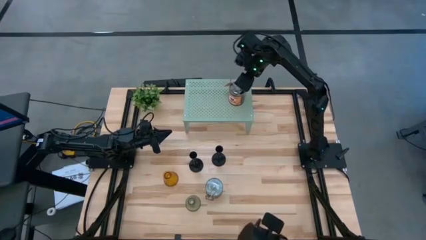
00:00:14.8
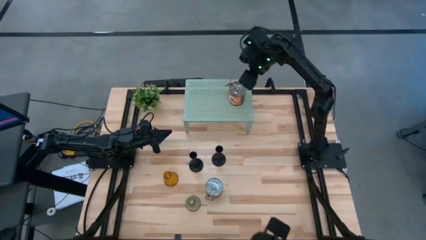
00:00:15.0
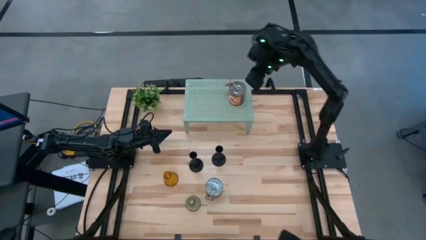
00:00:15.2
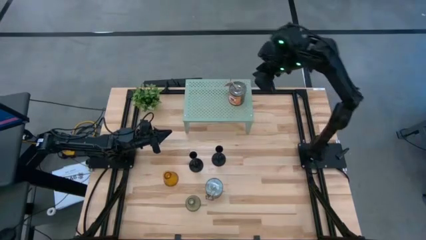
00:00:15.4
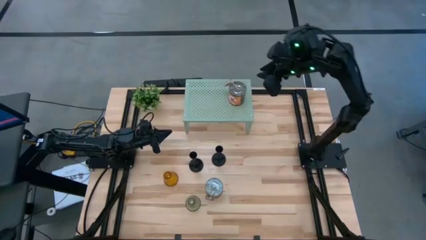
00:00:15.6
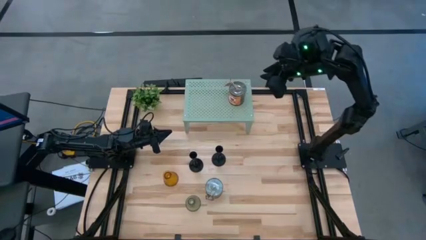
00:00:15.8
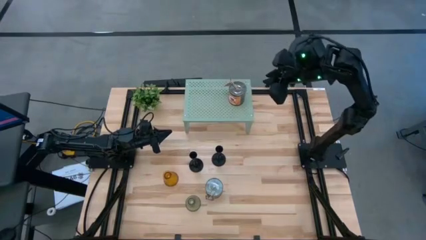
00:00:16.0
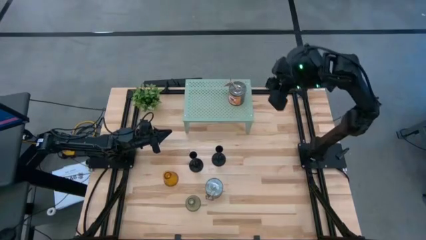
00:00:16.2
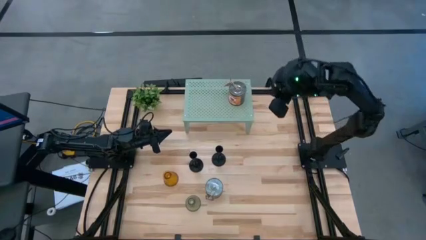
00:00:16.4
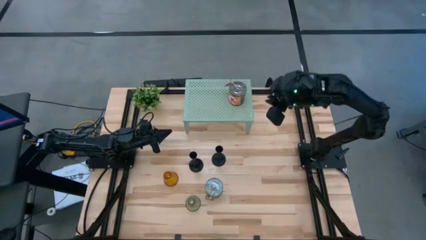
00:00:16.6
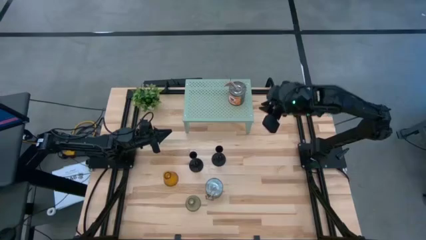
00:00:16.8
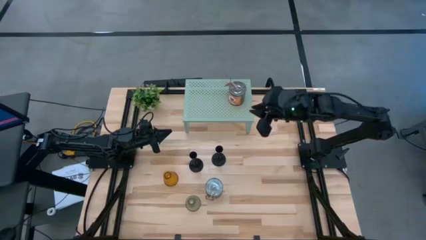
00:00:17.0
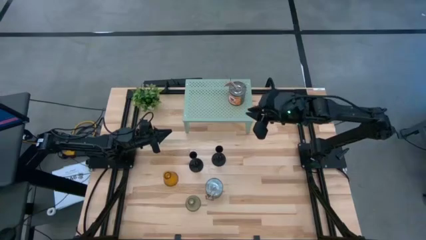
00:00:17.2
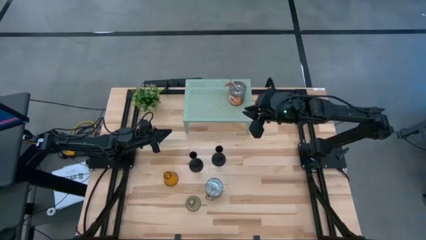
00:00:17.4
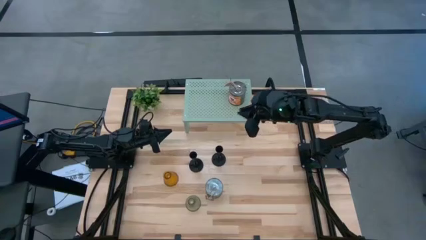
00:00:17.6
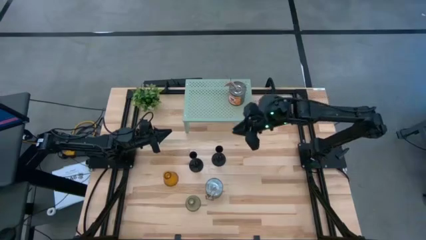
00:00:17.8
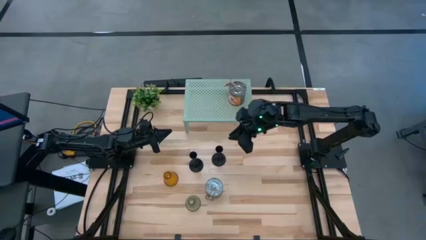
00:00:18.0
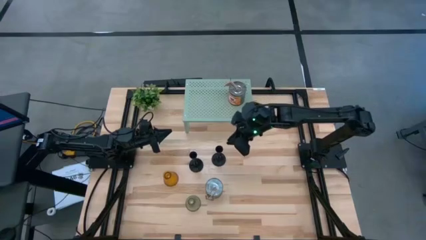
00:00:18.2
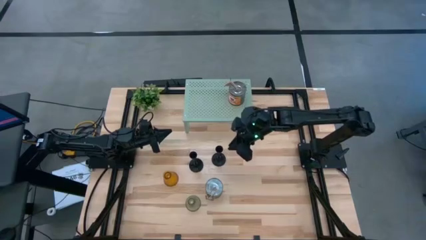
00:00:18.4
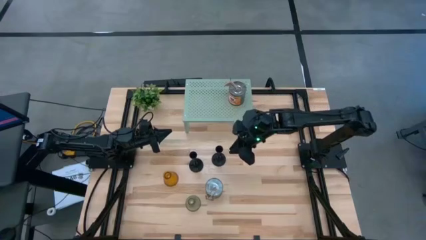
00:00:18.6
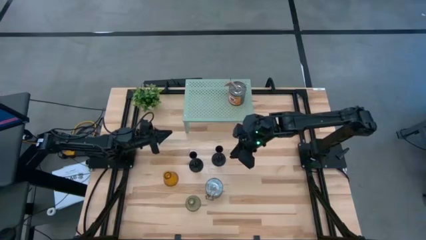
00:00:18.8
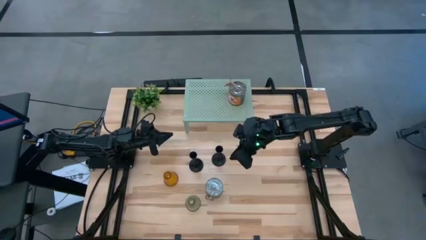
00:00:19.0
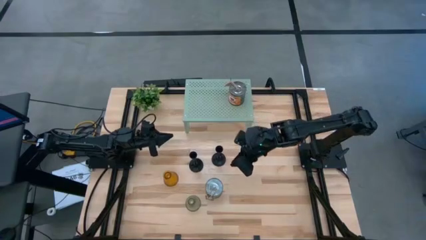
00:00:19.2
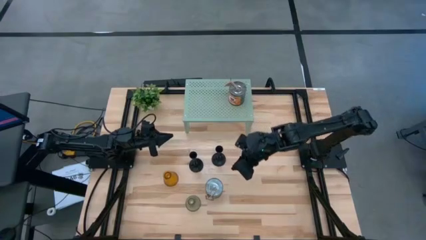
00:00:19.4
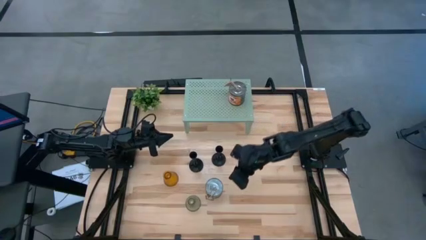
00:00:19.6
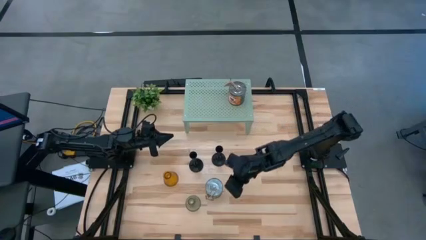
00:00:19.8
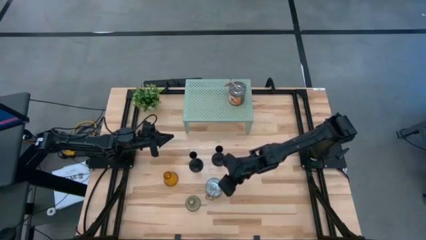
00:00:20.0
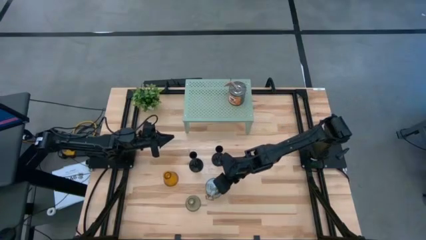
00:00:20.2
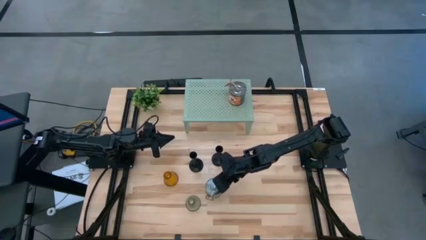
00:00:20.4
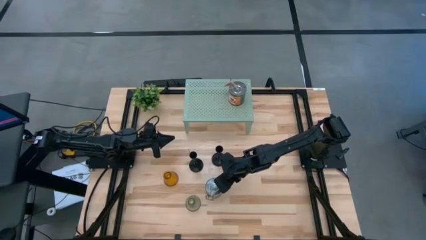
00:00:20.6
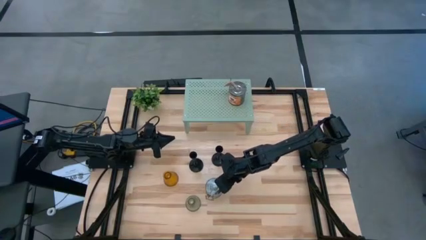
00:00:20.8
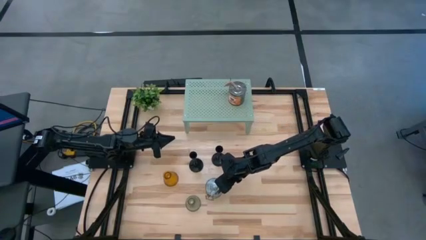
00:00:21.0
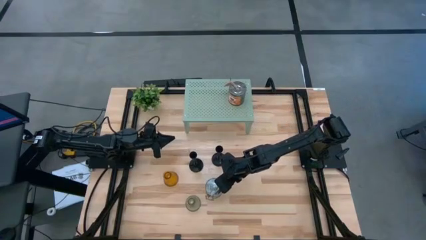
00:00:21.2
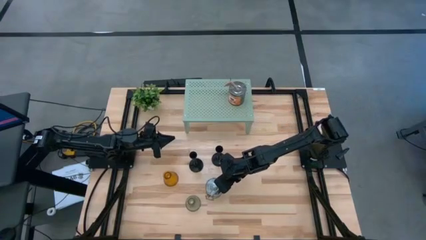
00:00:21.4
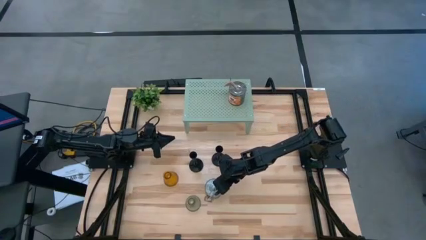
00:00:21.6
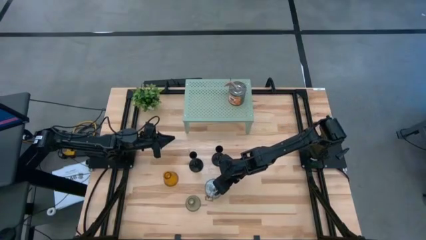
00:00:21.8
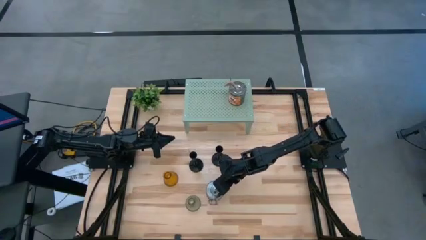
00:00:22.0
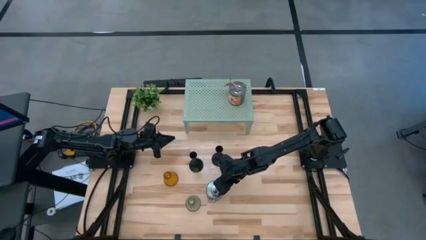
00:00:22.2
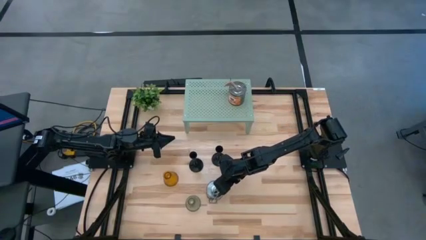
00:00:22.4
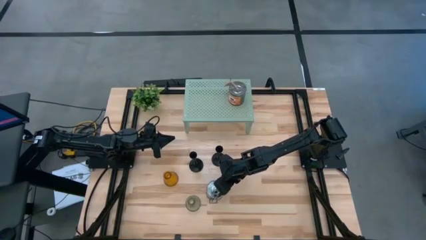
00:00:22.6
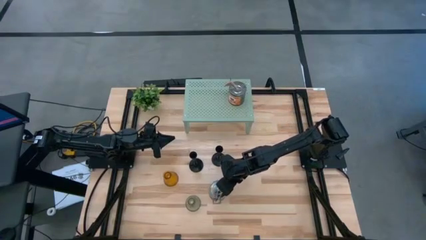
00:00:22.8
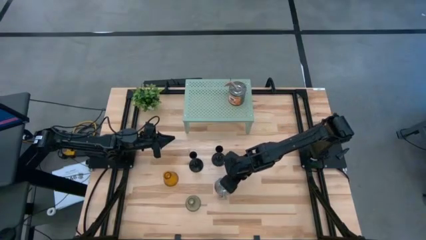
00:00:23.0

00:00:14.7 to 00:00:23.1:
Task: Pick & Place candle stick holders
Put the scented candle on the shelf

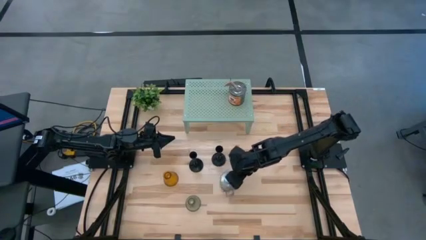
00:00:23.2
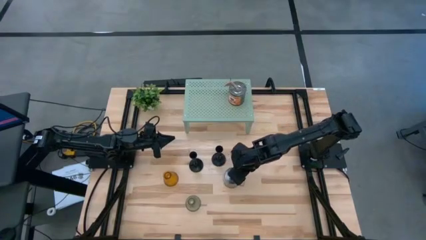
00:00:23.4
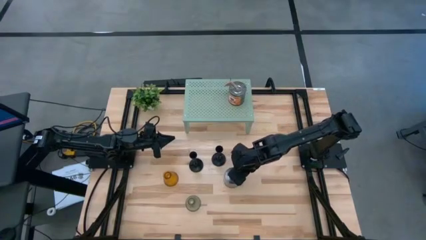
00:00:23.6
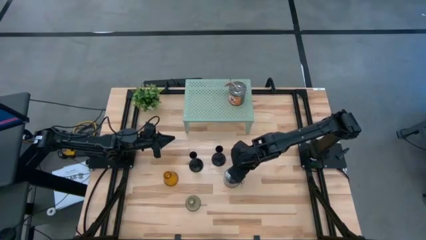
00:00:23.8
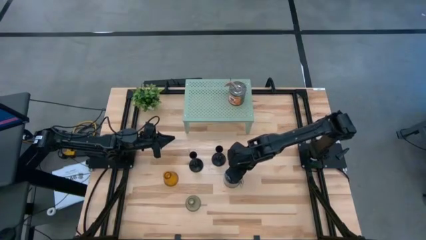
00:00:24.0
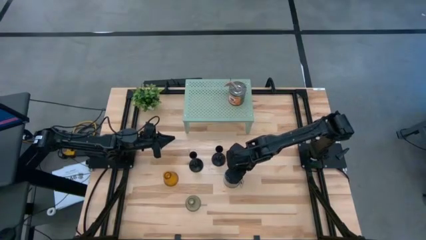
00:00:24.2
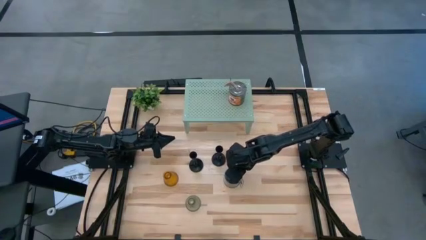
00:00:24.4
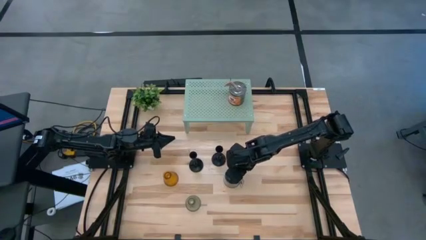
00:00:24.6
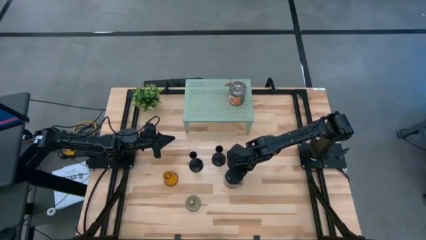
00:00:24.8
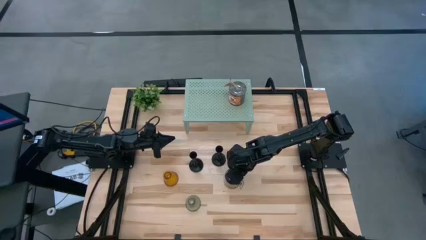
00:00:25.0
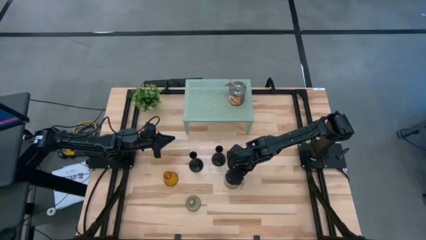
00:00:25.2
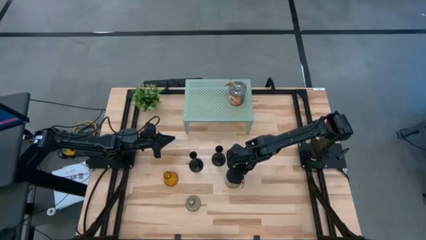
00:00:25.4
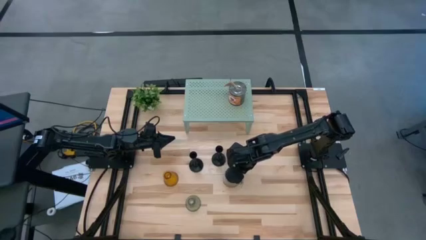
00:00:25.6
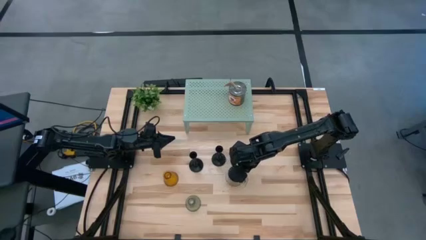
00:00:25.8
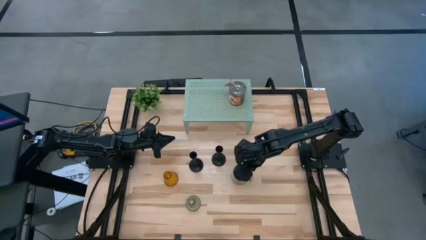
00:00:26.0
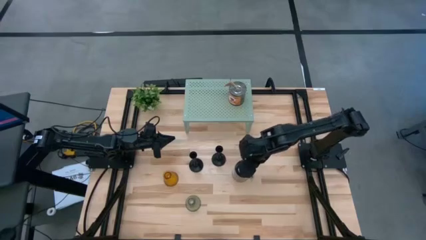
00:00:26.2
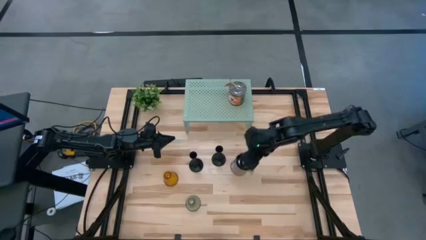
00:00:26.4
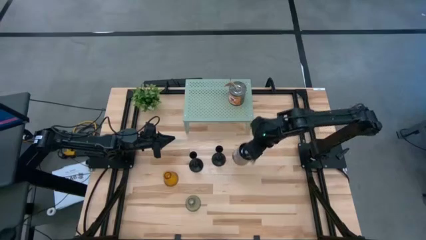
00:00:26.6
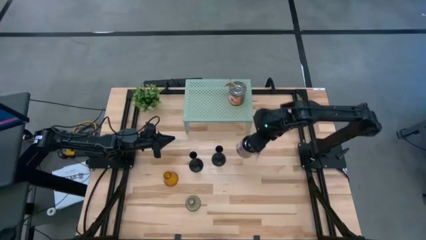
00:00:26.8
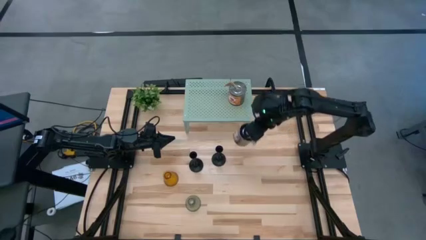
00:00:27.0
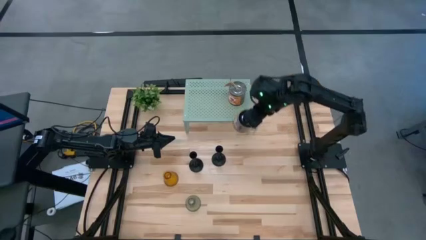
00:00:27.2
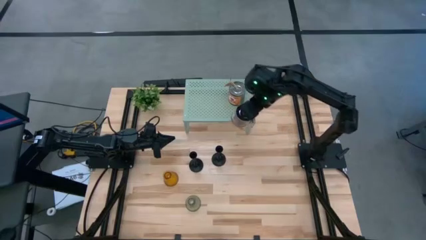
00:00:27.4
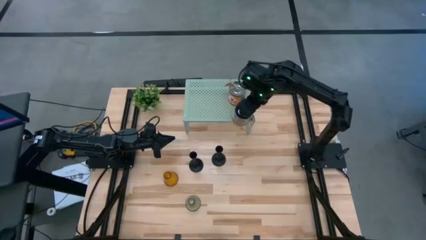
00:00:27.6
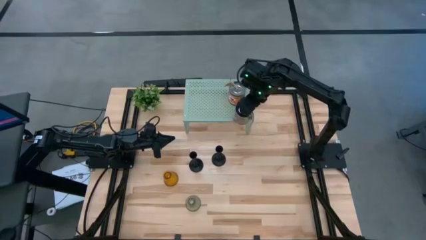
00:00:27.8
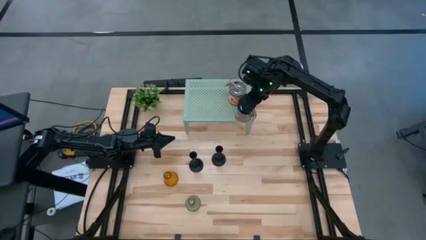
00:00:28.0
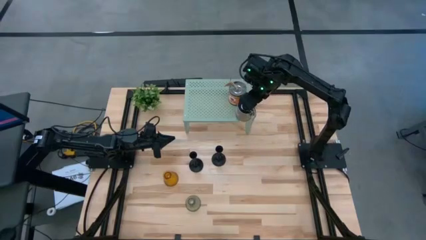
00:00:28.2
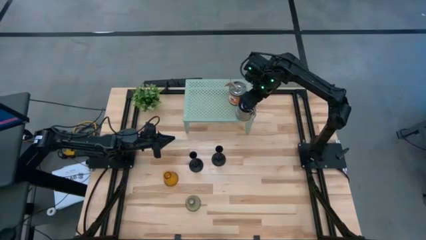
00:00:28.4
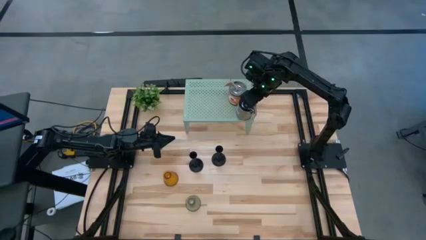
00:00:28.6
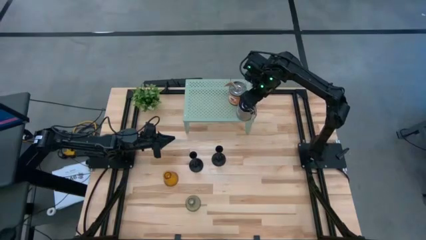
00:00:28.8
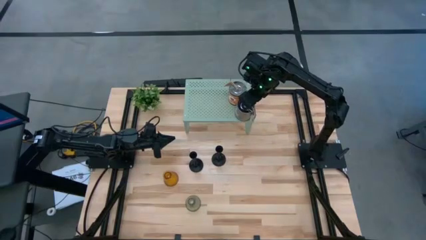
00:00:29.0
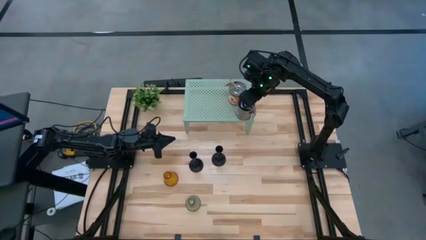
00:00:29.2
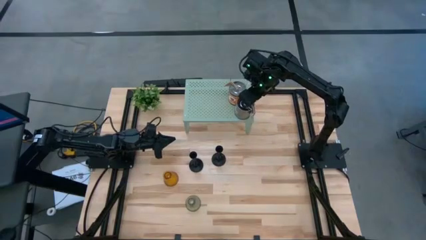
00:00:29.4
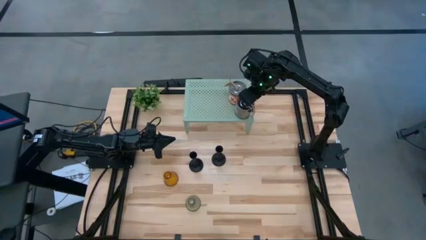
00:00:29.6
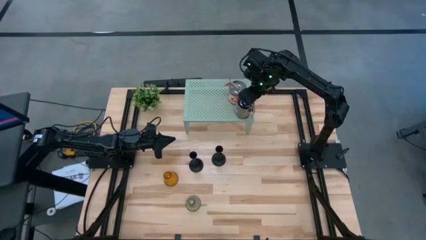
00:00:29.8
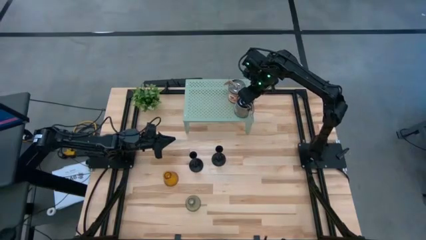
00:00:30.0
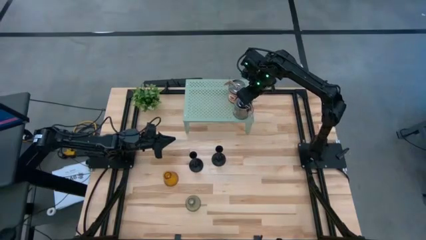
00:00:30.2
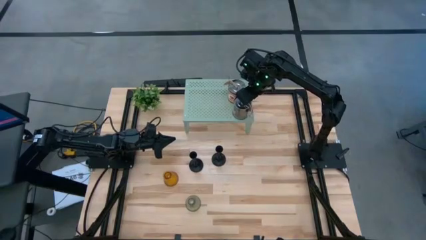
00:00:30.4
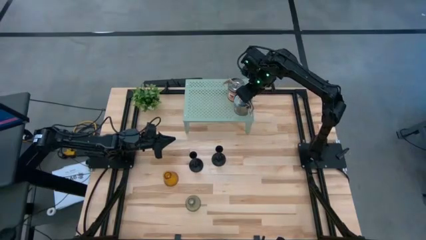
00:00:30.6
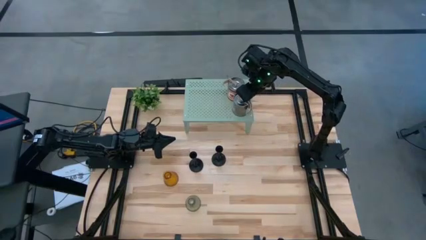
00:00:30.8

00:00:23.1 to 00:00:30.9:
Put the scented candle on the shelf
